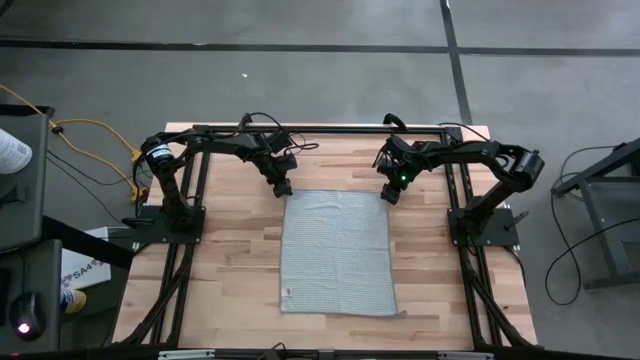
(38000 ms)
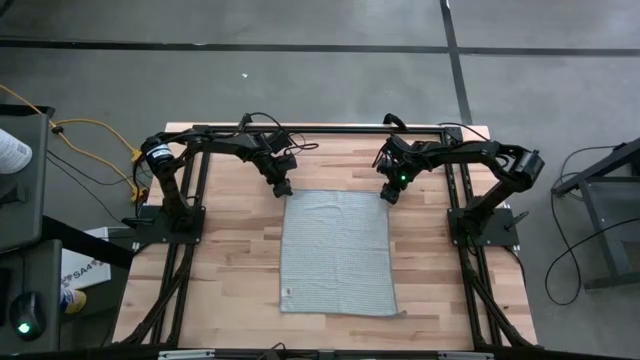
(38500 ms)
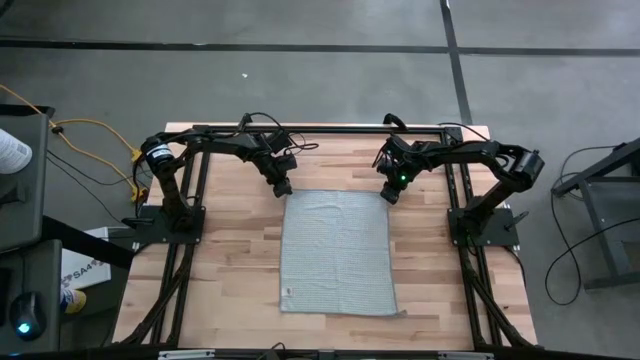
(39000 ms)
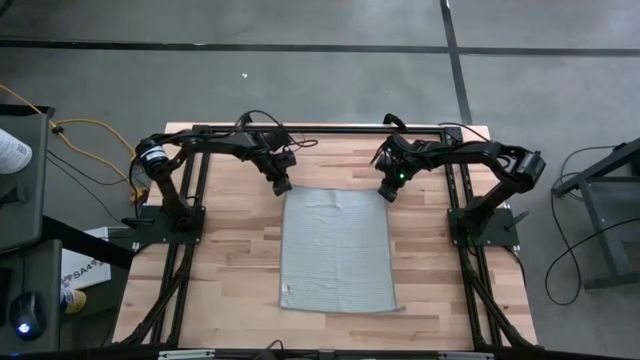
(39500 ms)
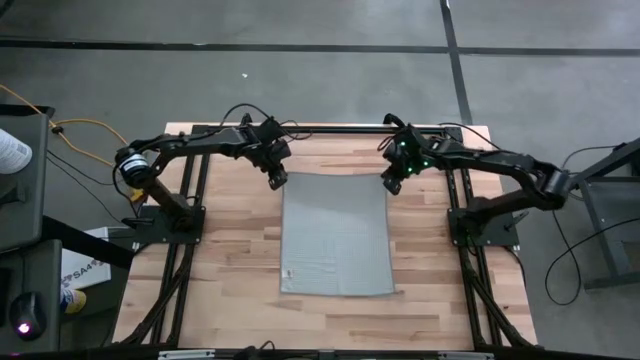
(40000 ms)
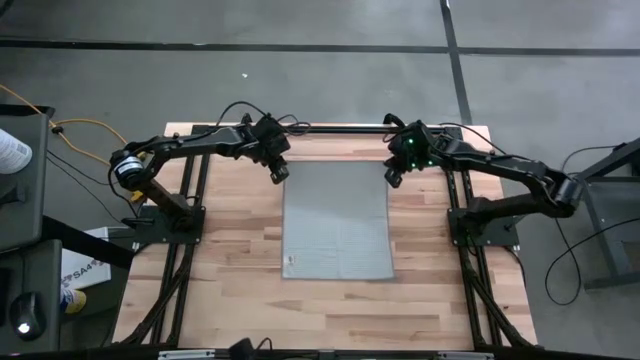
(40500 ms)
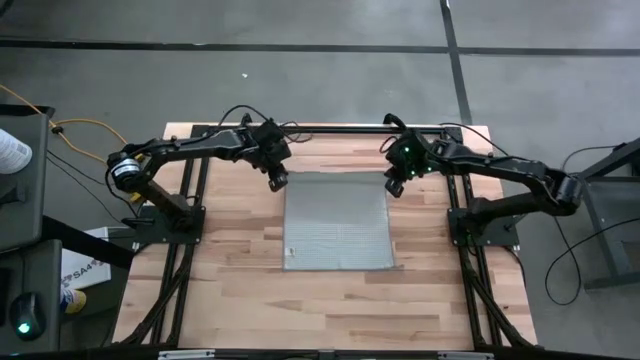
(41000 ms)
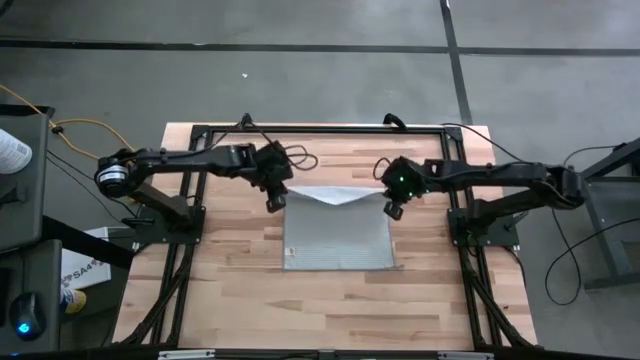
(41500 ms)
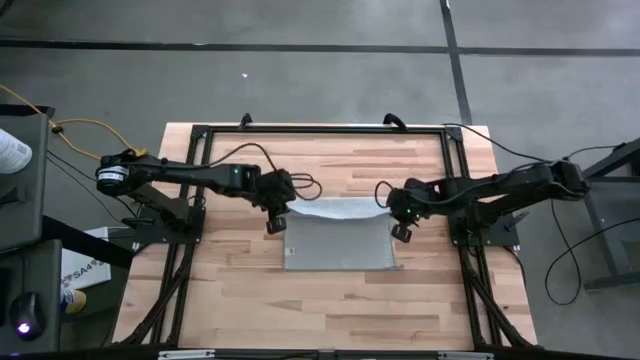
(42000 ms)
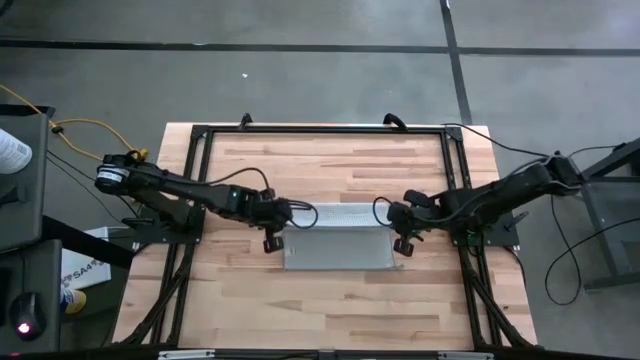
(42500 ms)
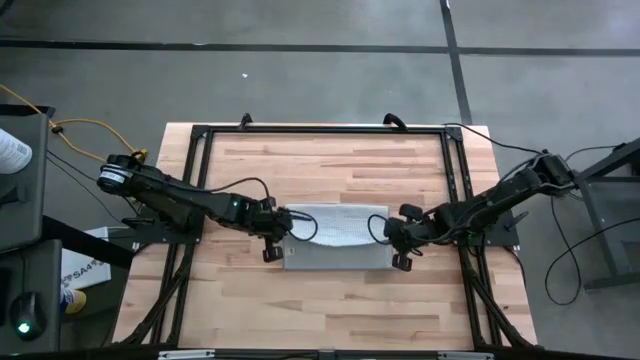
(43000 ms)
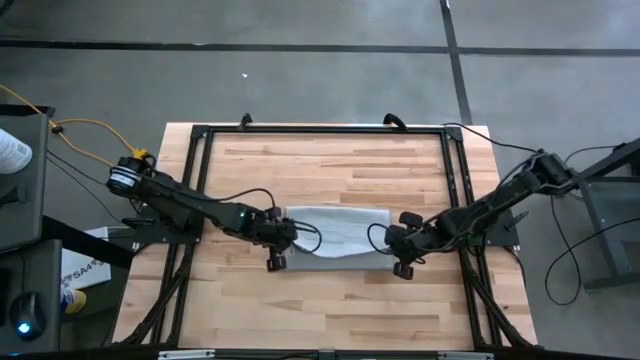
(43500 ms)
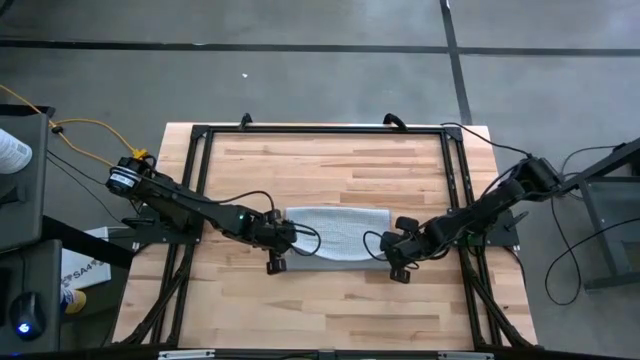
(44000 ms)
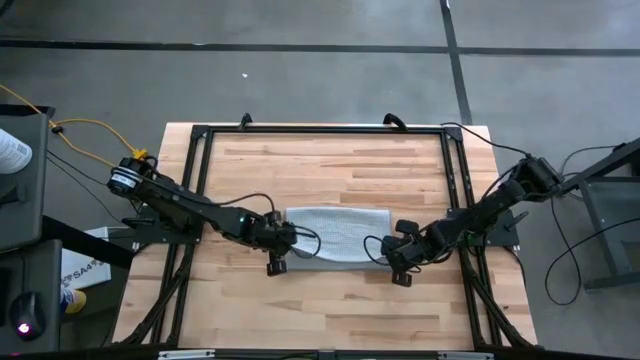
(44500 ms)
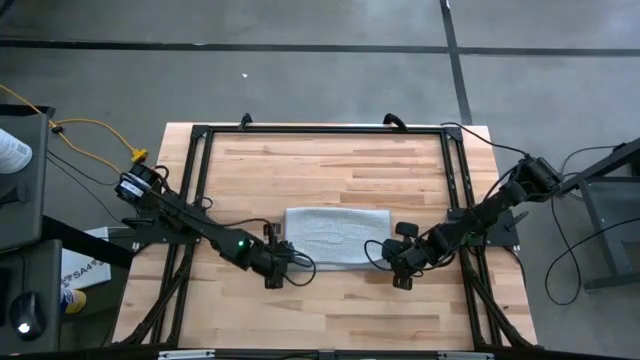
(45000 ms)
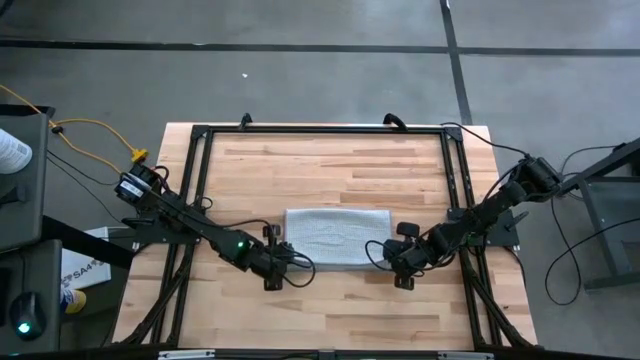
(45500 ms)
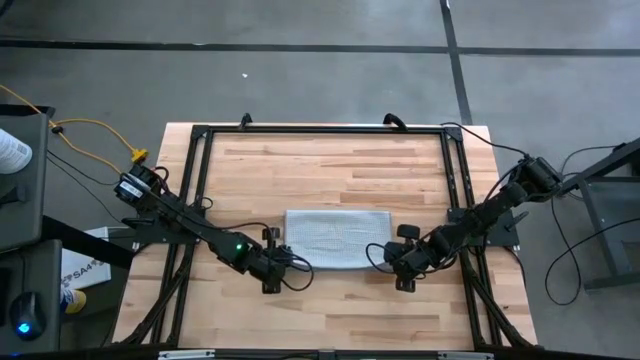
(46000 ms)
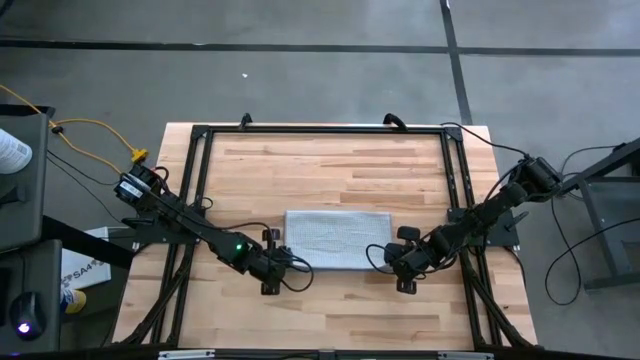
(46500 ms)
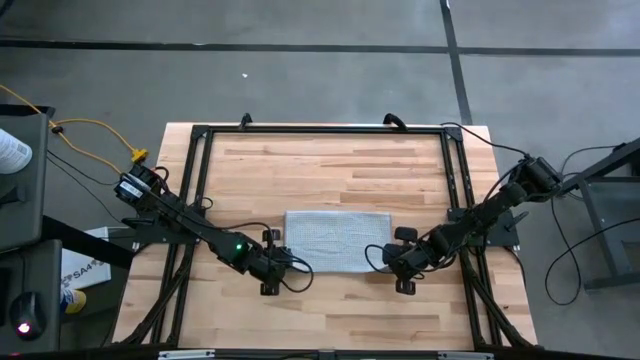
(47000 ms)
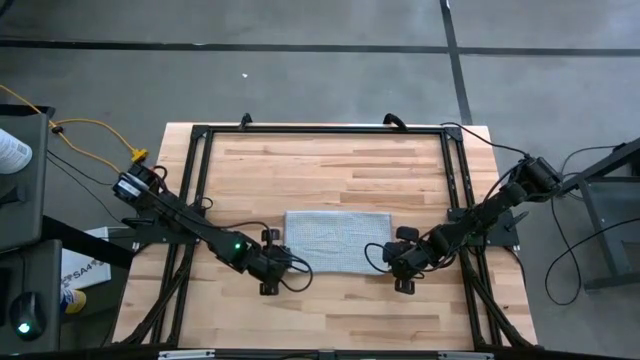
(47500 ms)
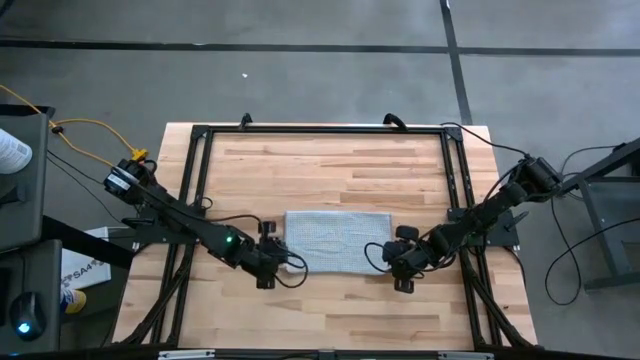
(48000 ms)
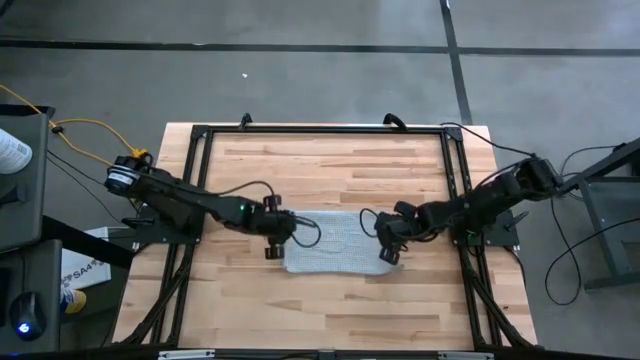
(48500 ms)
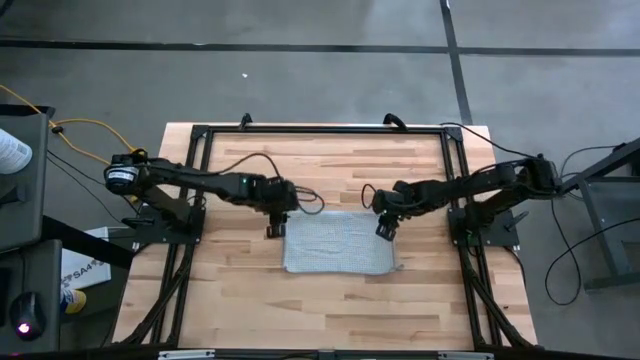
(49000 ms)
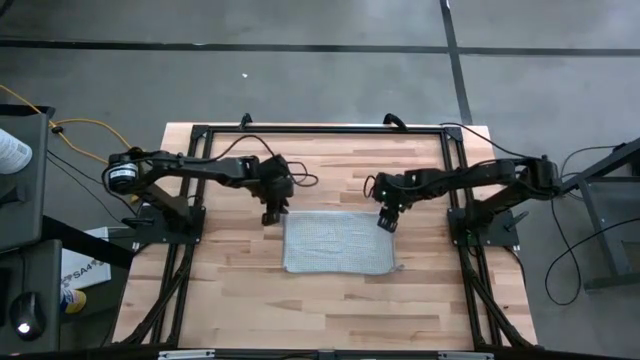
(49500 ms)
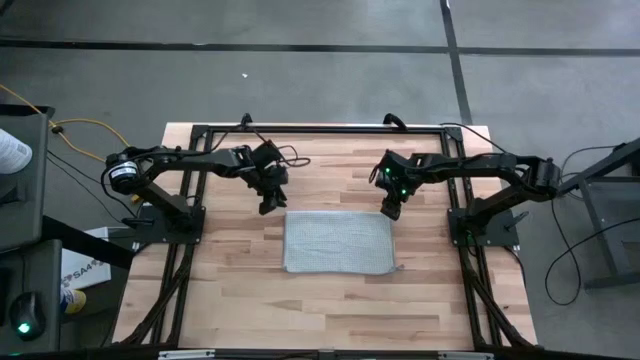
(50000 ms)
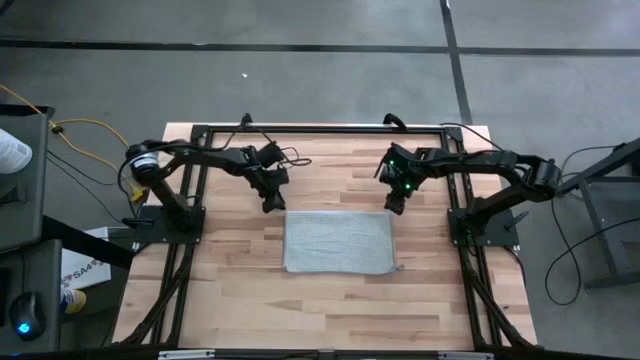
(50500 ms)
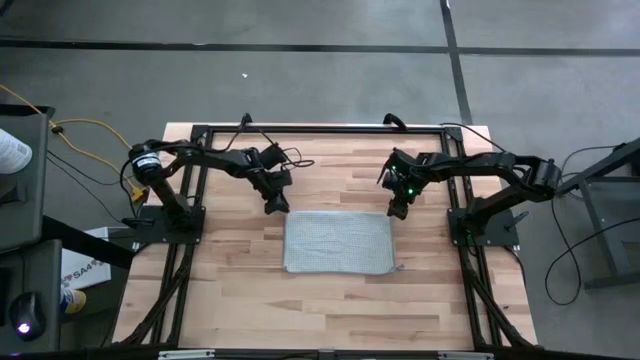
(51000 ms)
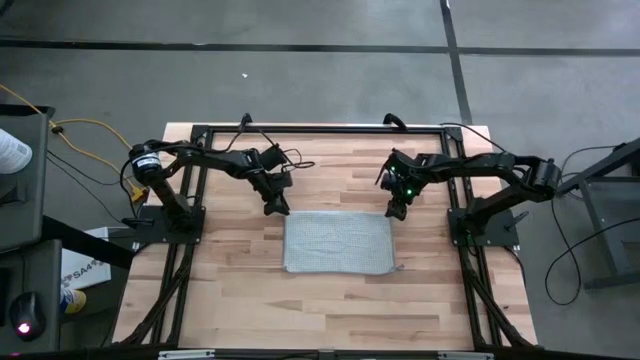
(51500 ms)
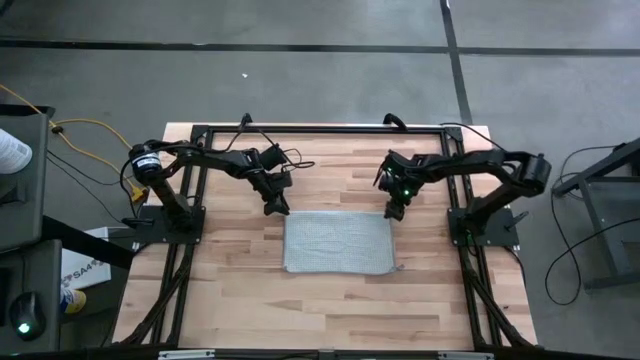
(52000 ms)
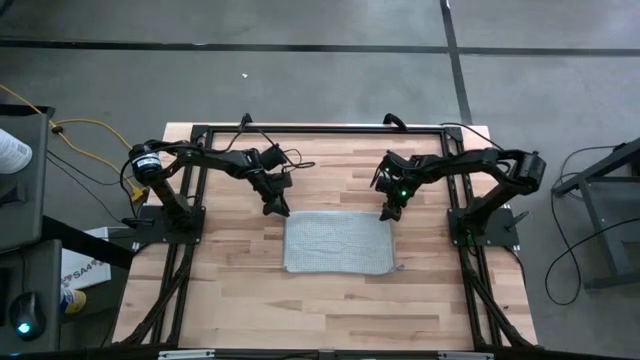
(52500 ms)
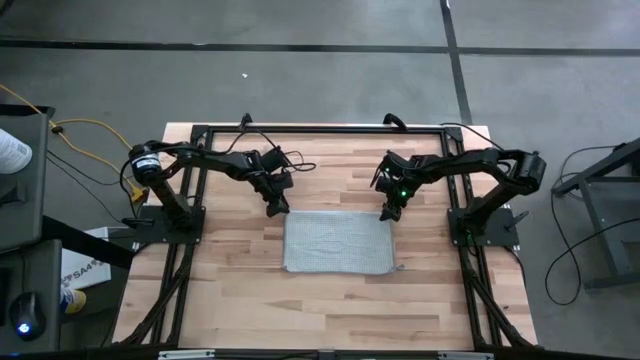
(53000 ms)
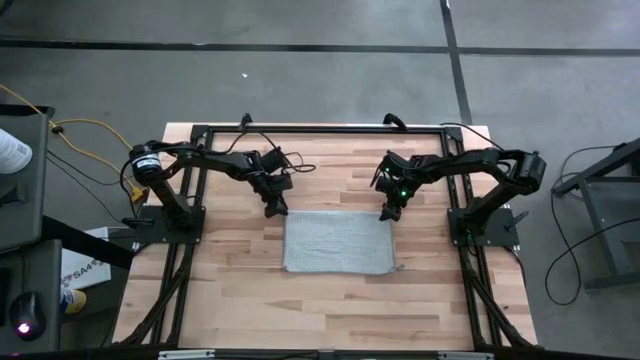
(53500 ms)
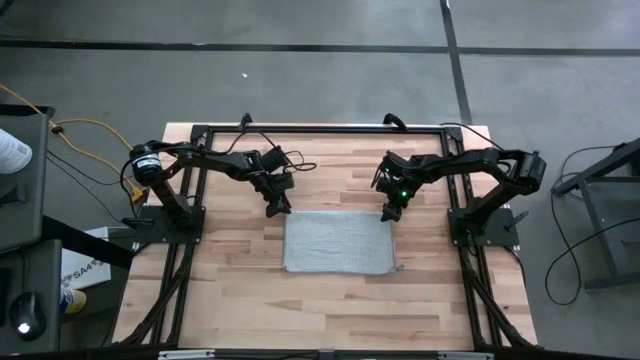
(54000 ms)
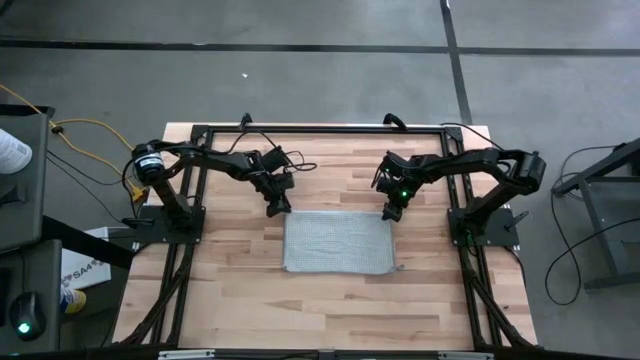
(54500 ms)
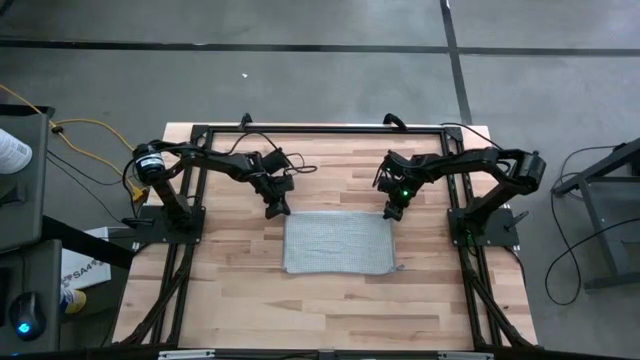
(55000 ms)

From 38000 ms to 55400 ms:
Task: Fold microfiber towels
Fold the gray microfiber towel

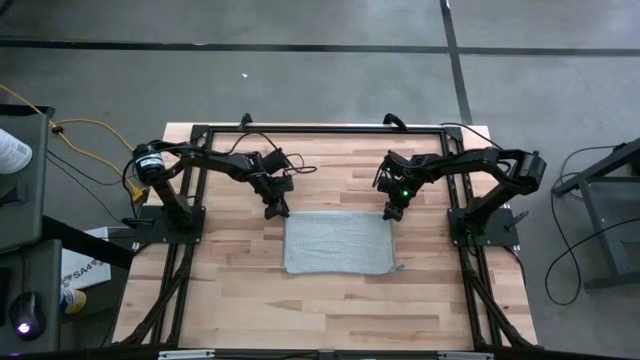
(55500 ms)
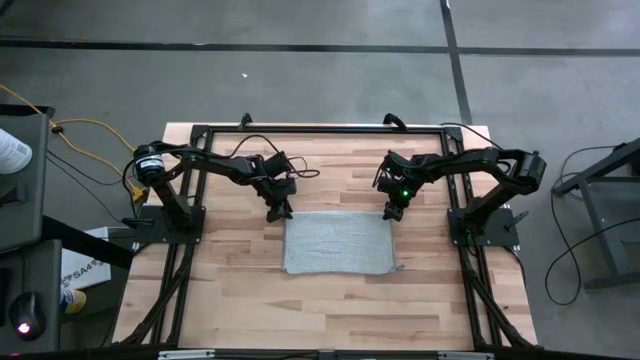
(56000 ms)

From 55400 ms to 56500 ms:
Fold the gray microfiber towel

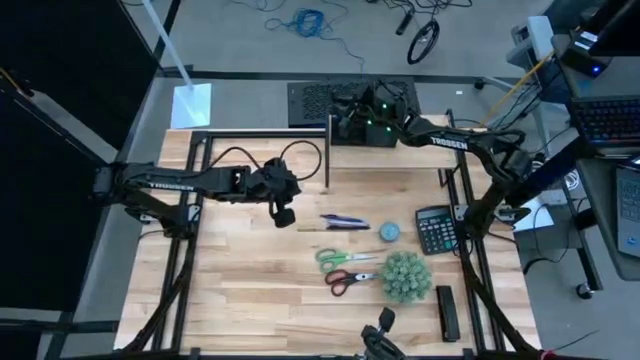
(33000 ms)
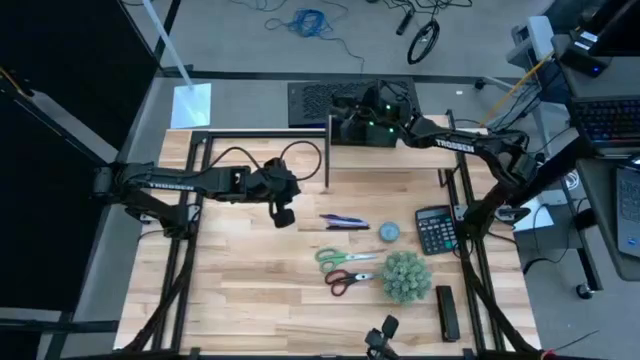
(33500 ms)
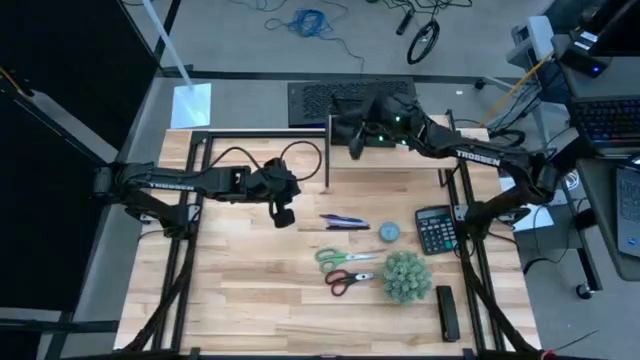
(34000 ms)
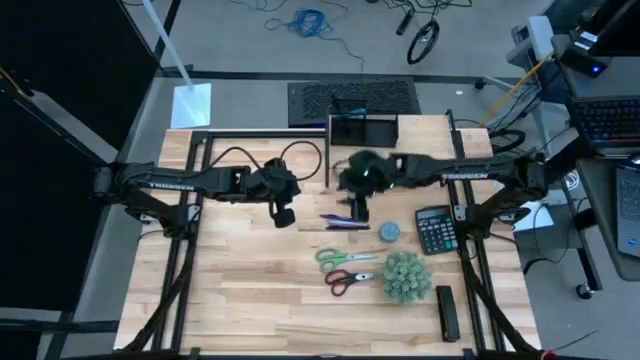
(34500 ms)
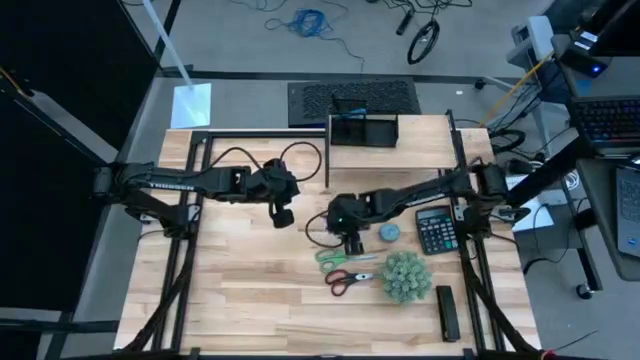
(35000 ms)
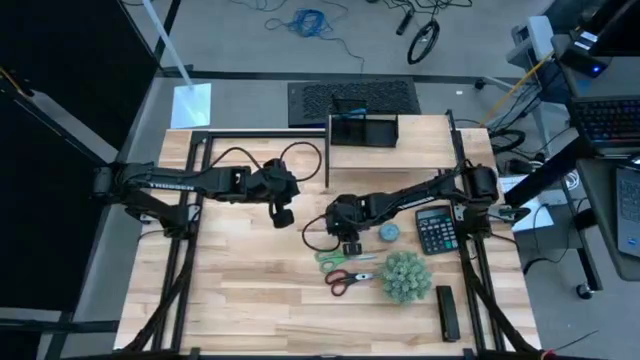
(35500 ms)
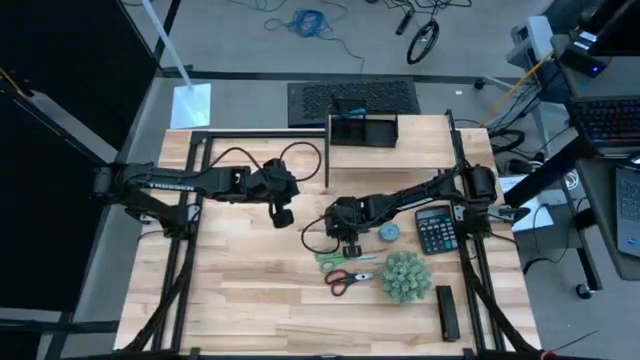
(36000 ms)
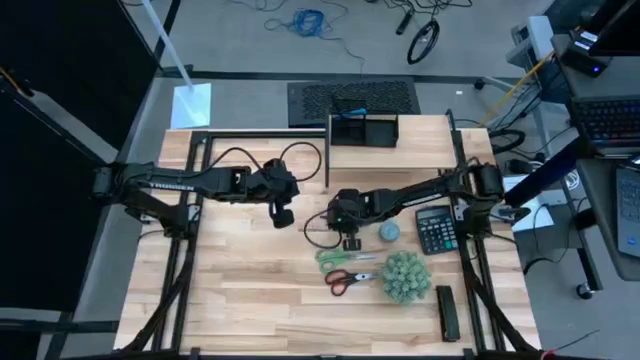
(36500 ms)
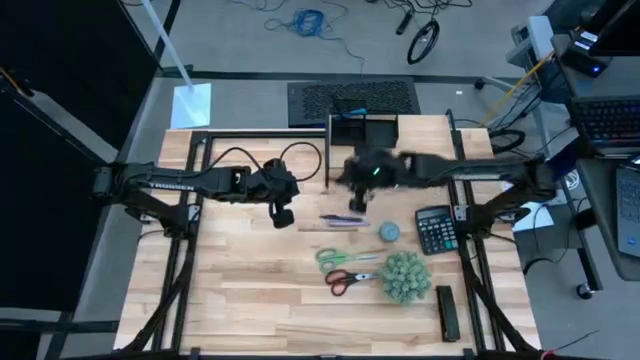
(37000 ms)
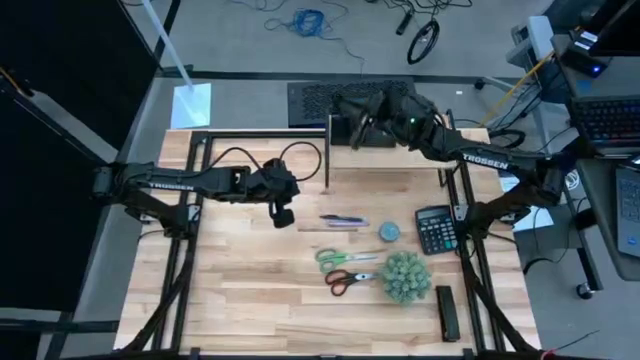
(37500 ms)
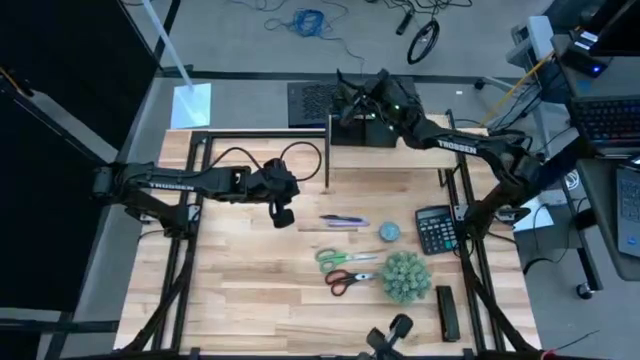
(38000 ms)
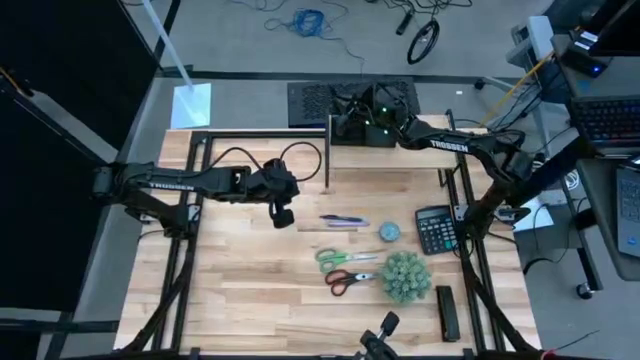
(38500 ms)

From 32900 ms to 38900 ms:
Task: Pick and place office supplies into organizer
Put the black pen into the black desk organizer on the shelf
